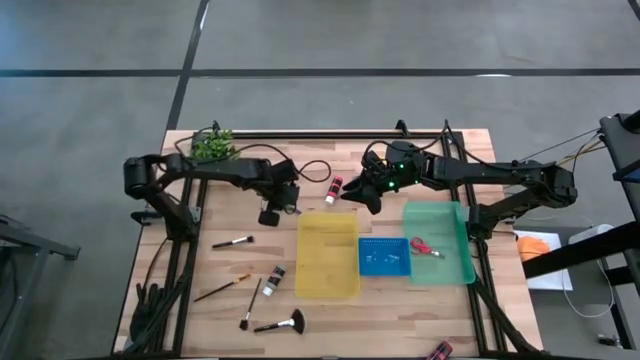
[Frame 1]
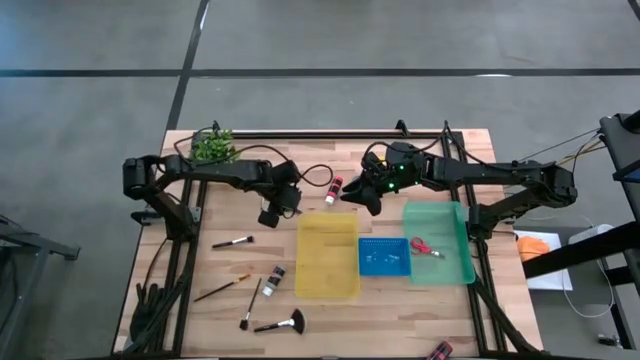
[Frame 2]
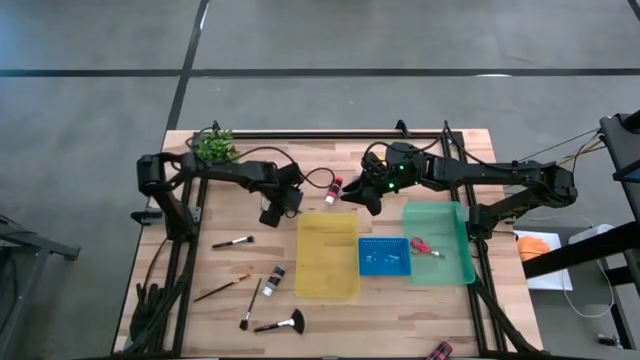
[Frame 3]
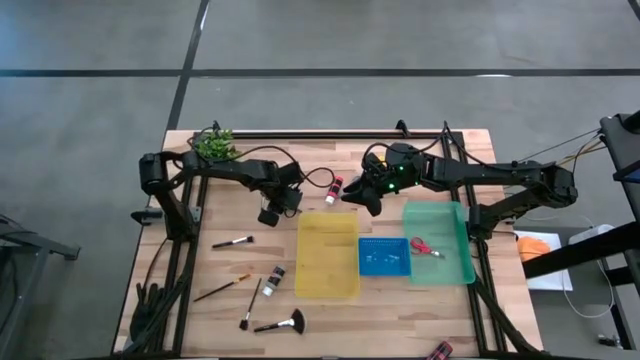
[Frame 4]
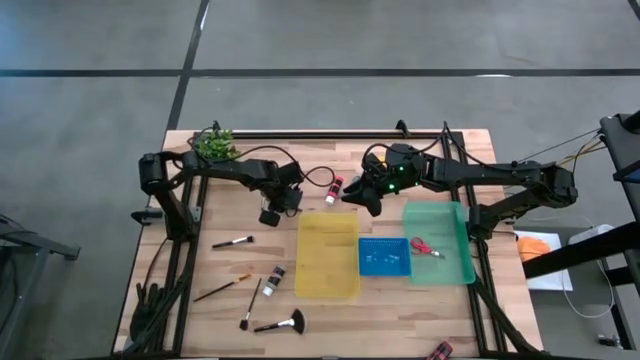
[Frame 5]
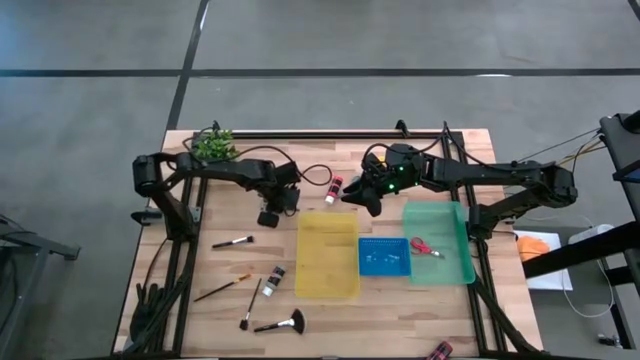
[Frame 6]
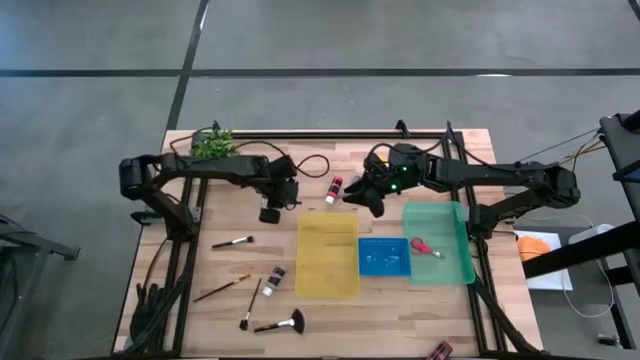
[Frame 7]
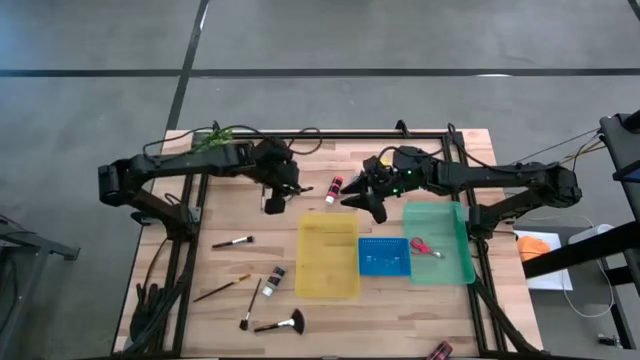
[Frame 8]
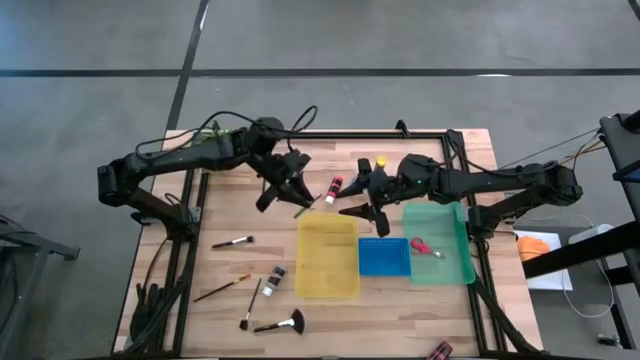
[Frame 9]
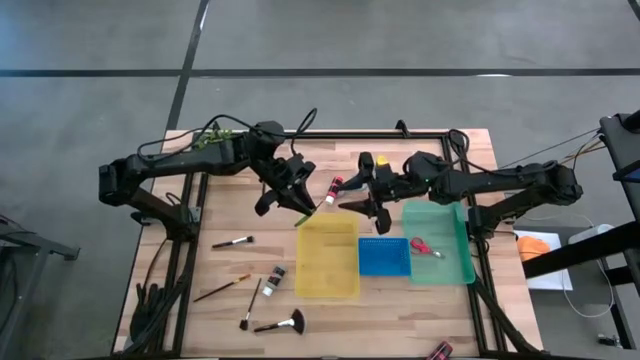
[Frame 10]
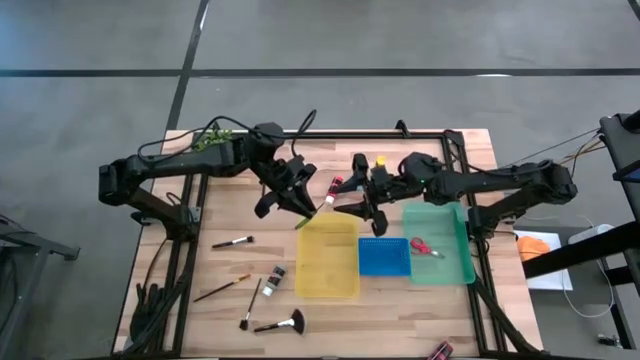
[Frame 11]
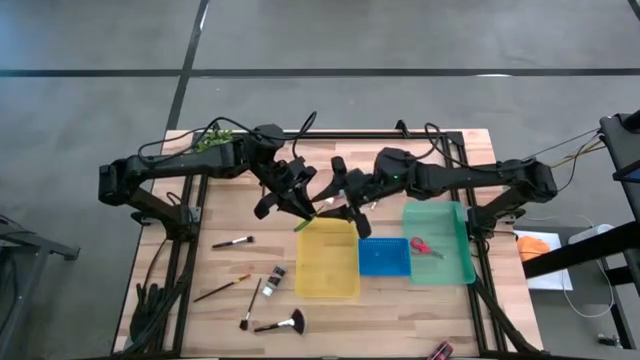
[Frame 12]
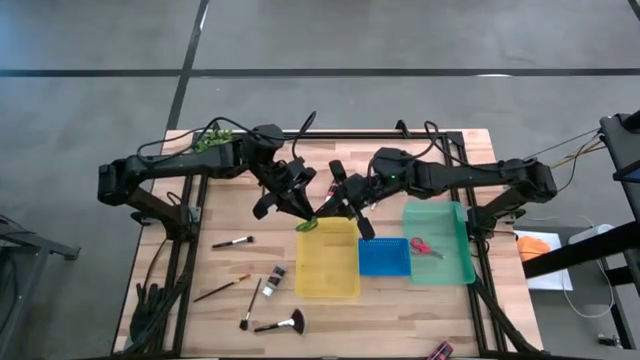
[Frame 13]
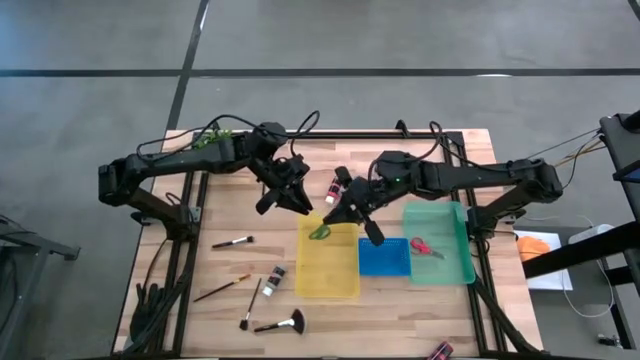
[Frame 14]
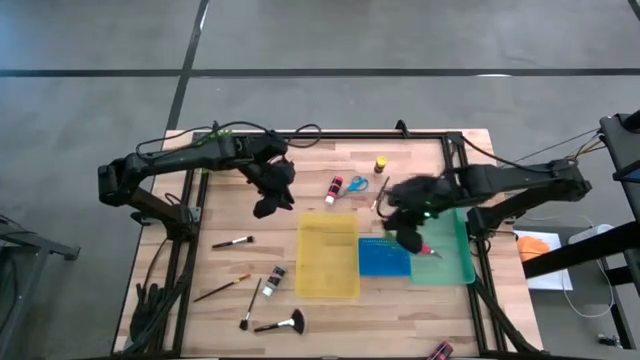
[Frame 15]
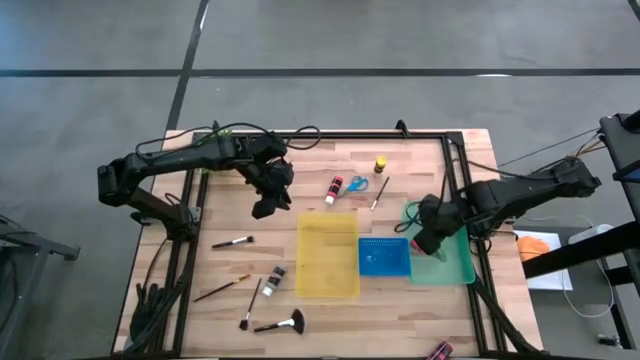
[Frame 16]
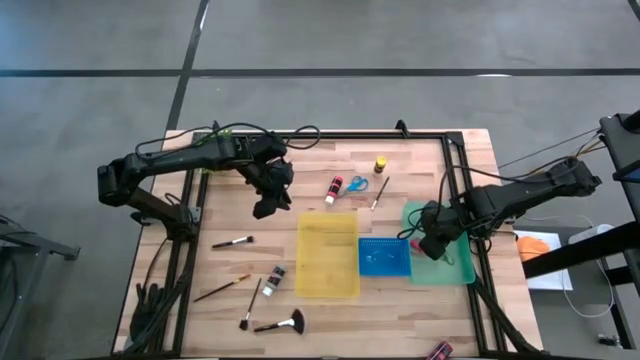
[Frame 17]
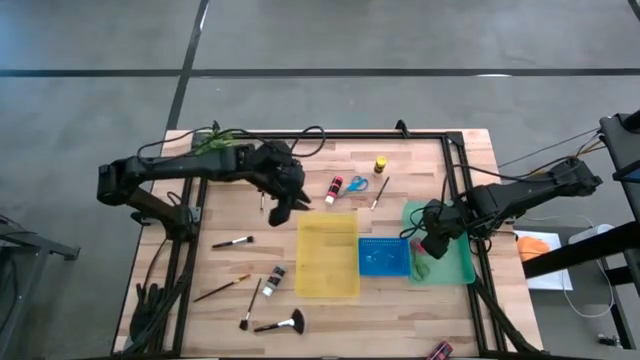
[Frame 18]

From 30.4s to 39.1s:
Task: Pick & Place Paint Supplies
Put the green scissors into the green bin

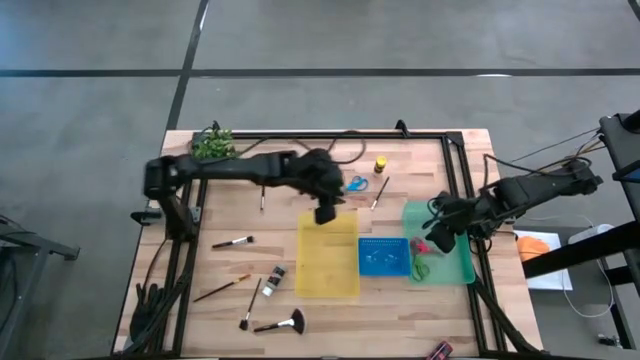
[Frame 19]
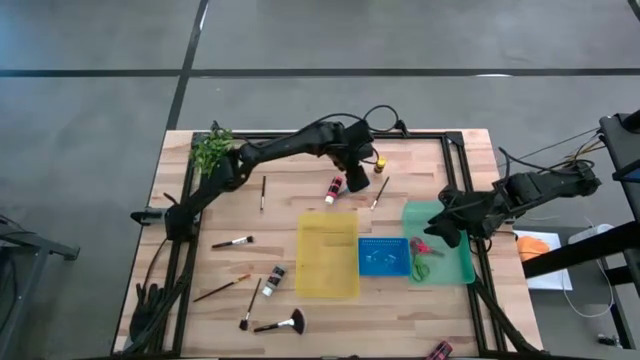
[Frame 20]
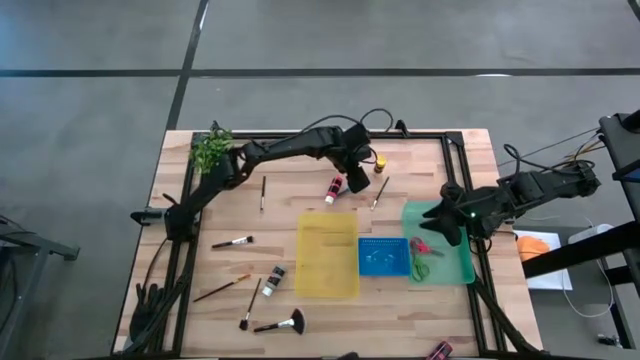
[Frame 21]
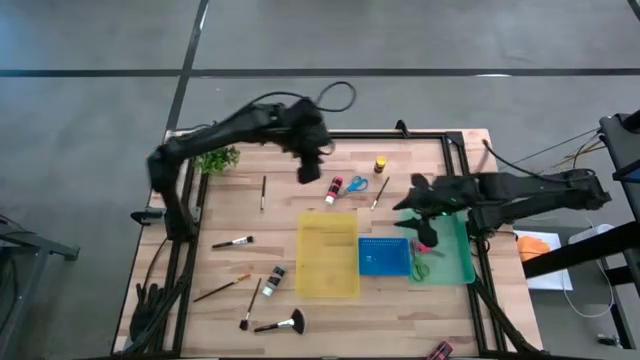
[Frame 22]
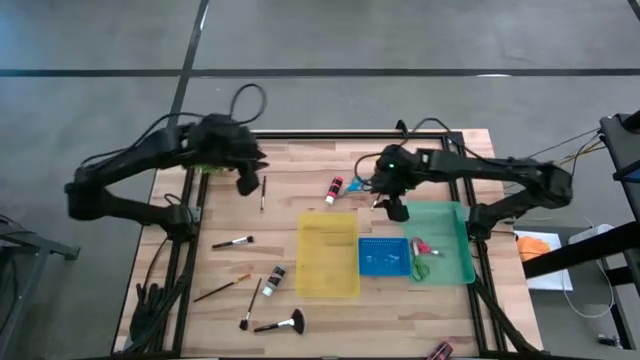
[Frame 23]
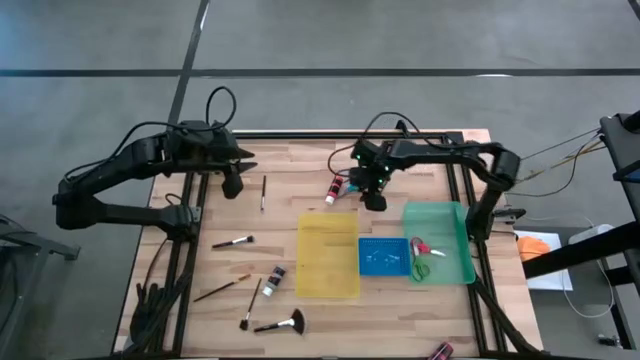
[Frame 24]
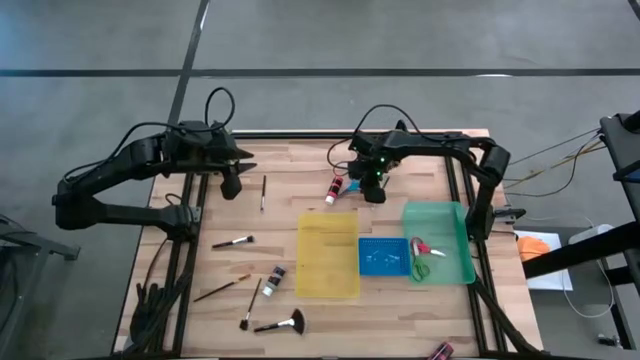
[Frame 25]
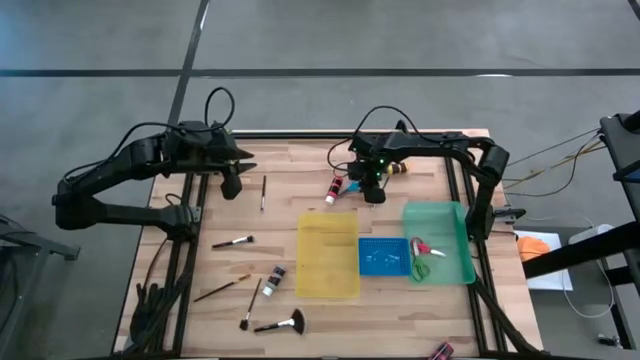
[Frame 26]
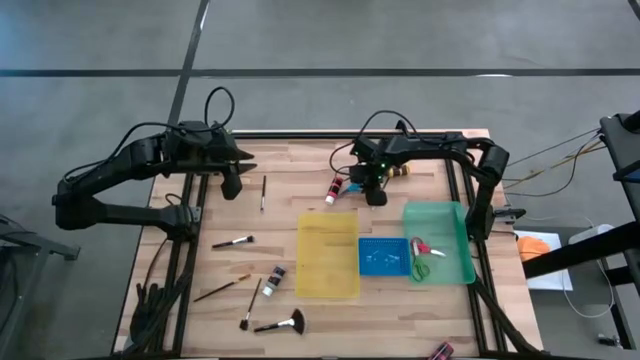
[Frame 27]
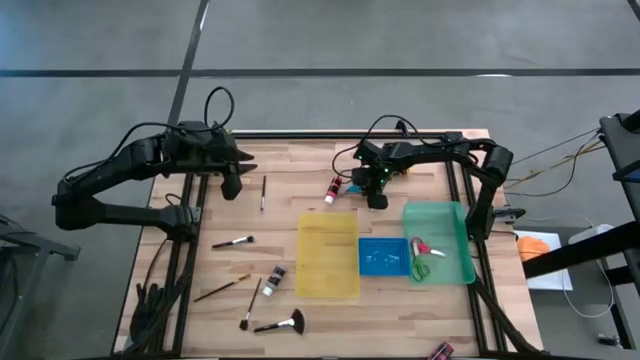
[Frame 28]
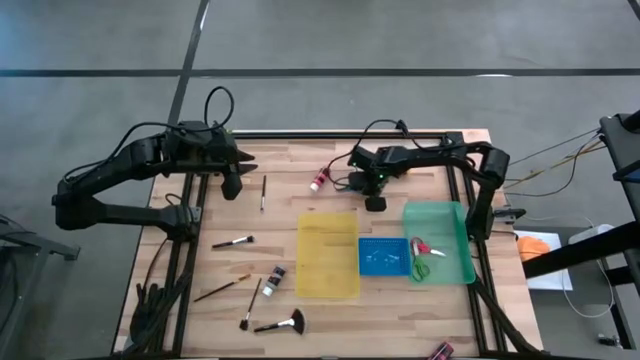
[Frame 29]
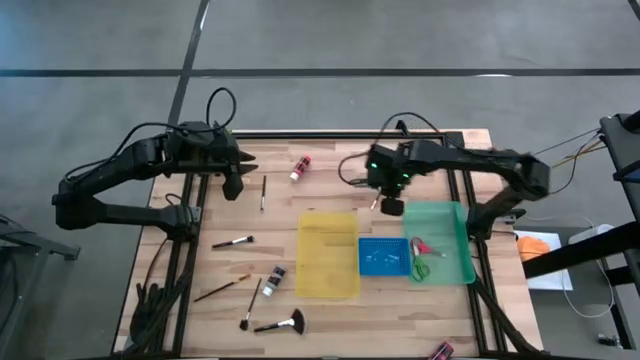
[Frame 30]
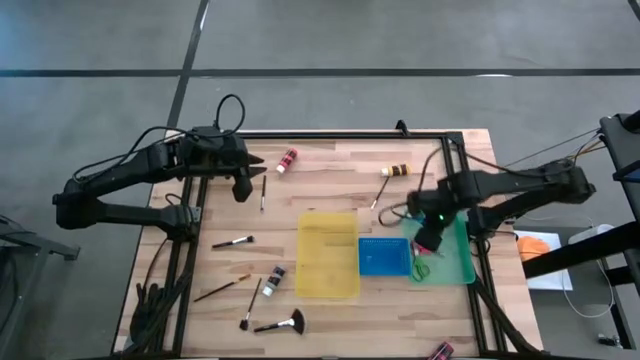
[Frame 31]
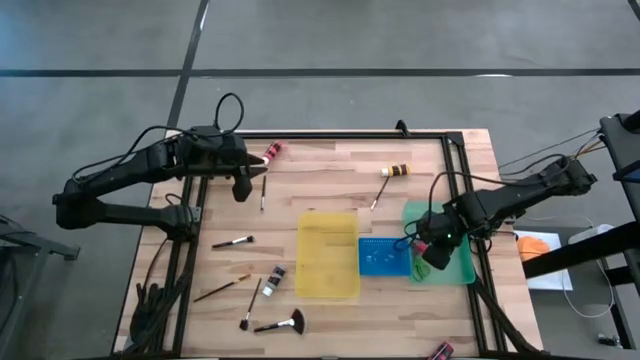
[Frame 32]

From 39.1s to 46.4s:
Put the blue scissors into the green bin

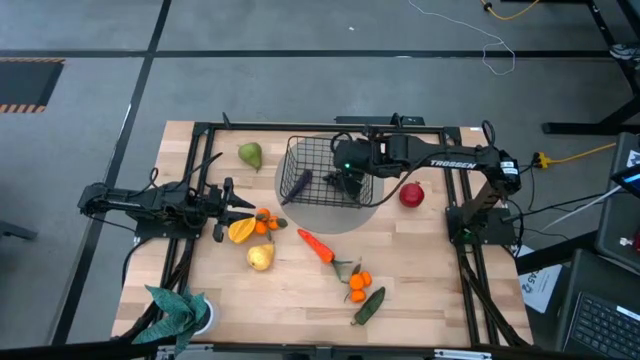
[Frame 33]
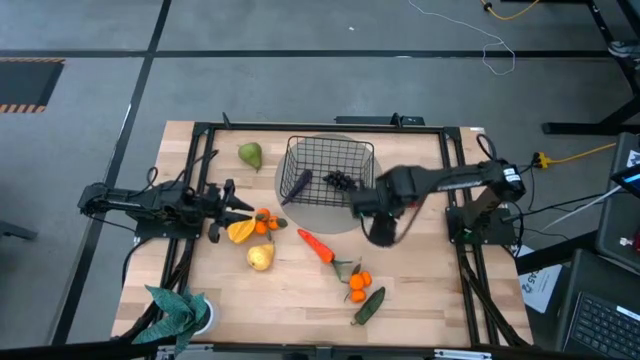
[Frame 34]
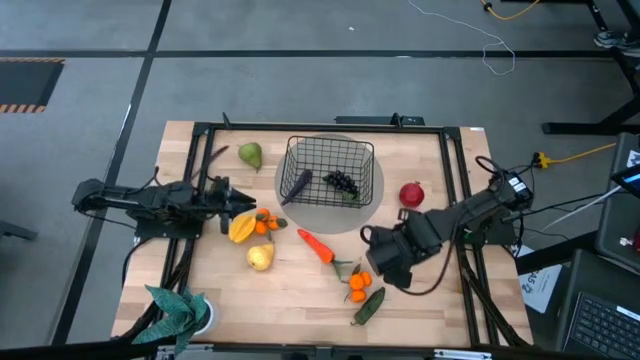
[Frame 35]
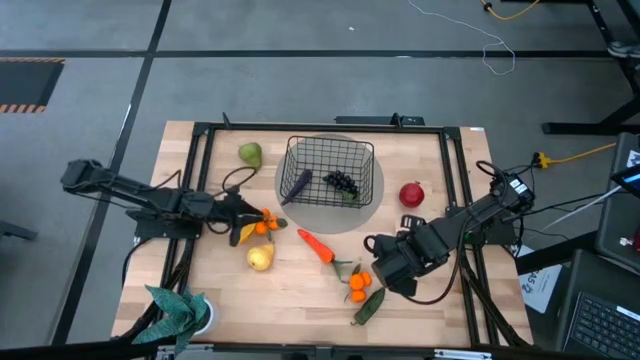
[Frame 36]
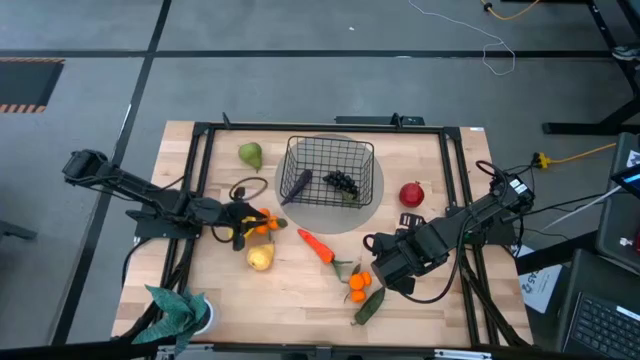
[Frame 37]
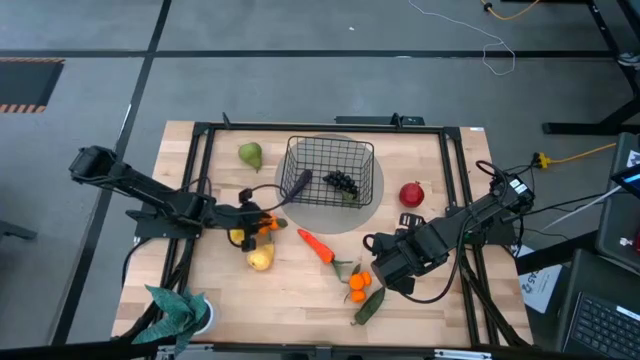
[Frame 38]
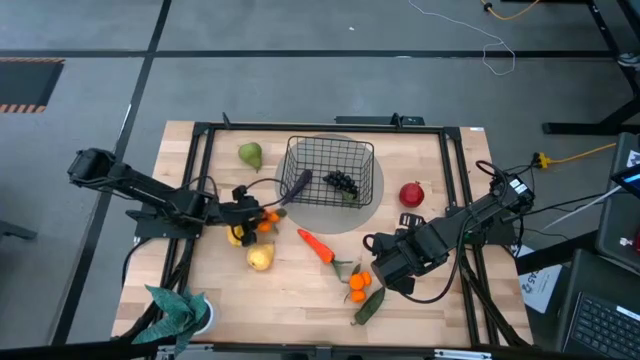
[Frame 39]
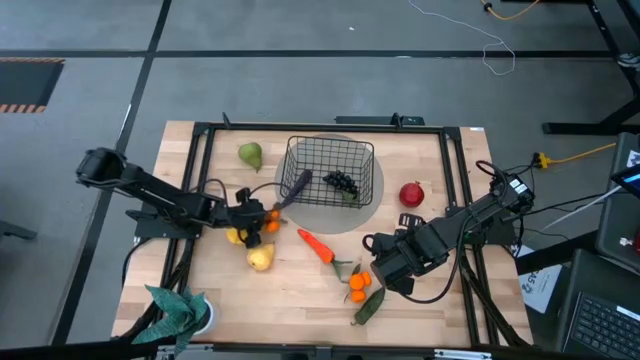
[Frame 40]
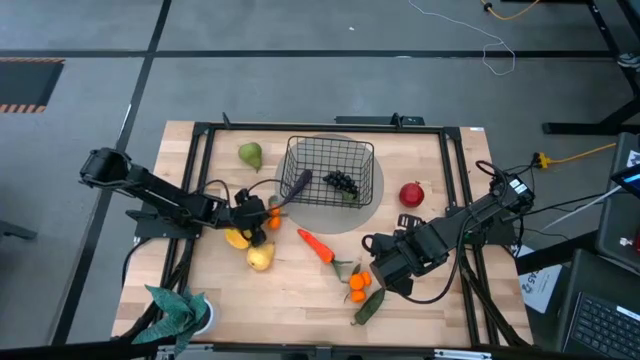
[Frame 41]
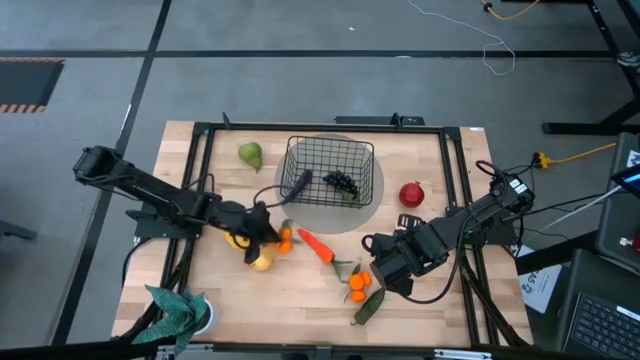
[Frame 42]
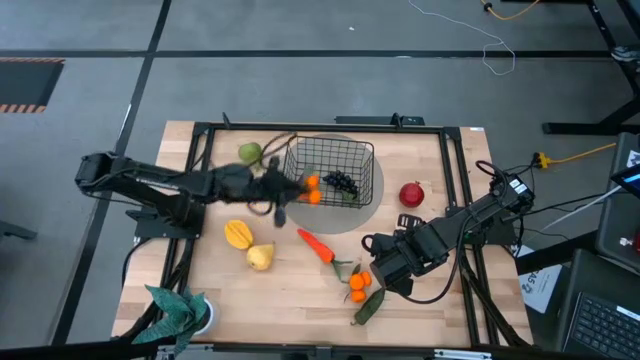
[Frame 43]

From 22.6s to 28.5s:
Task: Build produce basket
Put the left oranges into the black wire basket
